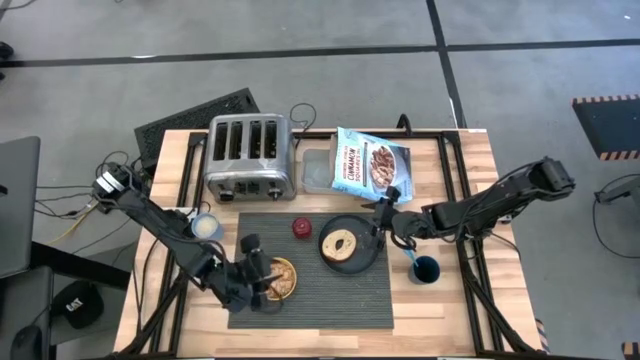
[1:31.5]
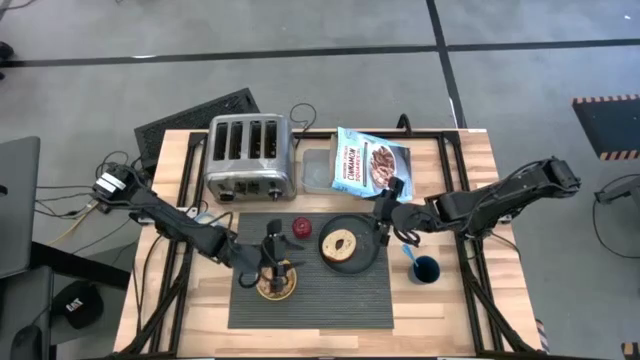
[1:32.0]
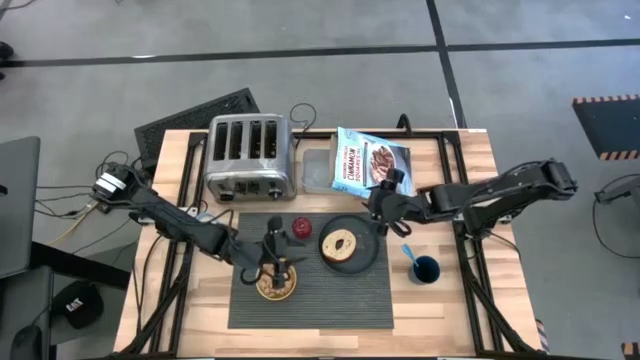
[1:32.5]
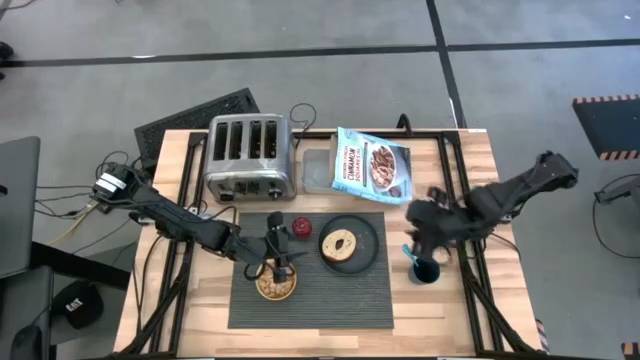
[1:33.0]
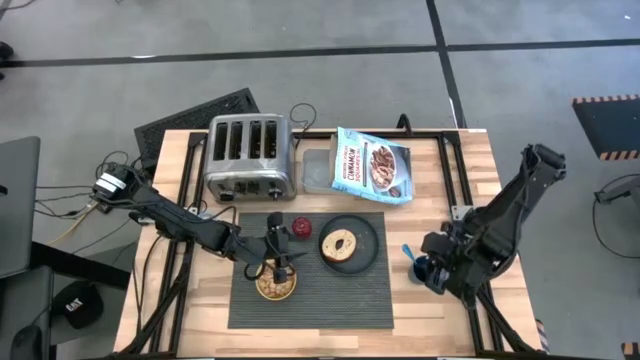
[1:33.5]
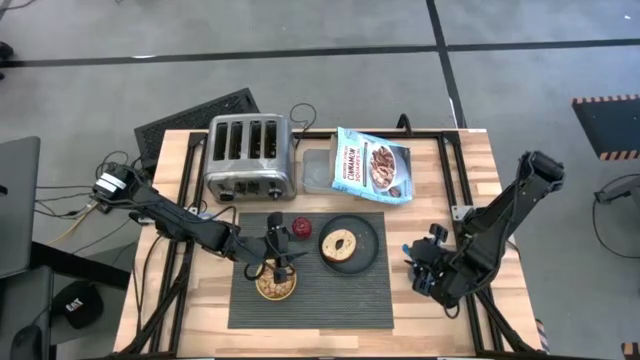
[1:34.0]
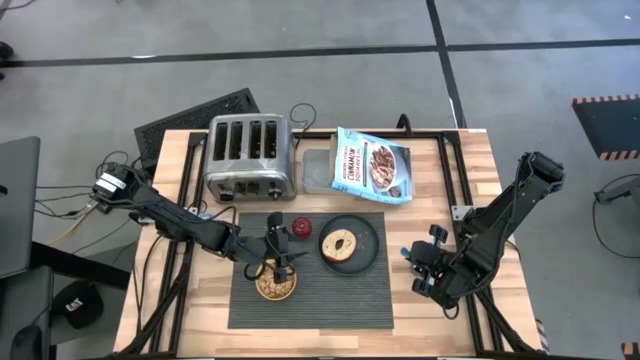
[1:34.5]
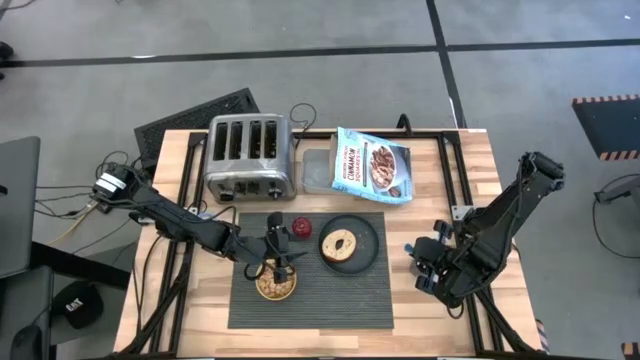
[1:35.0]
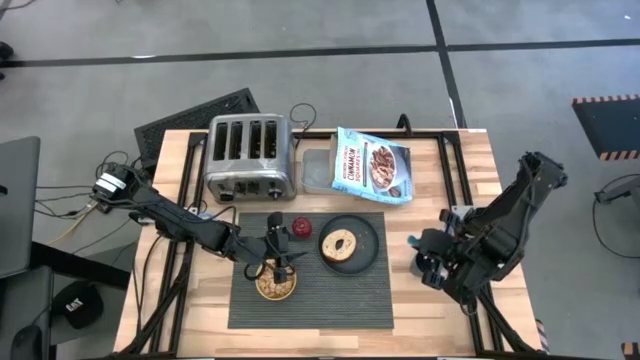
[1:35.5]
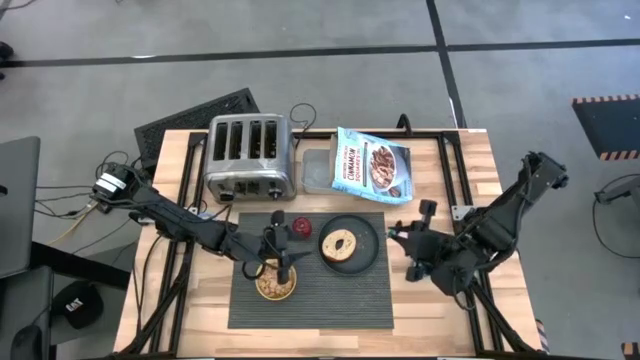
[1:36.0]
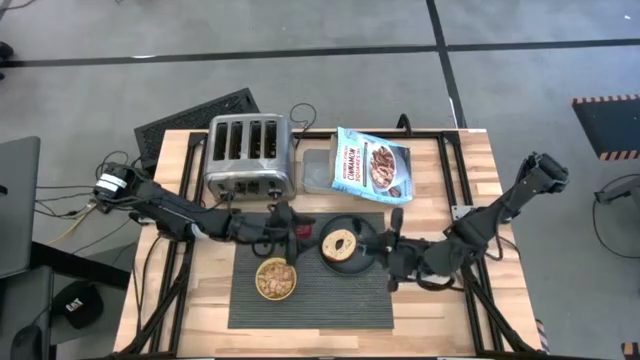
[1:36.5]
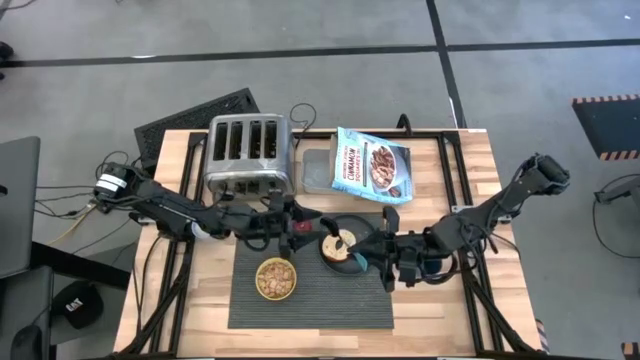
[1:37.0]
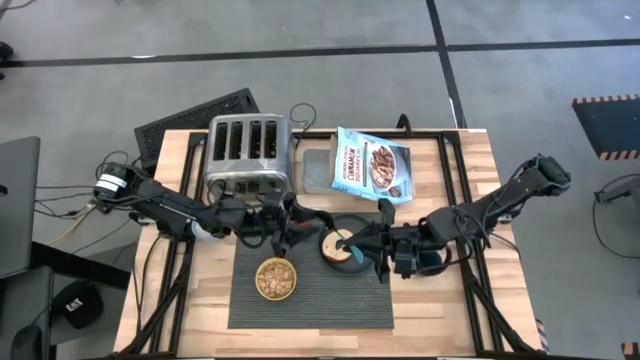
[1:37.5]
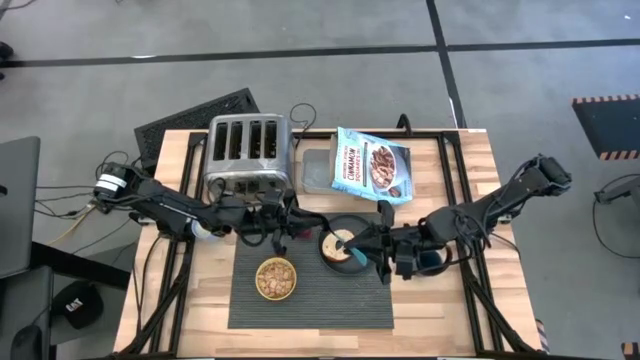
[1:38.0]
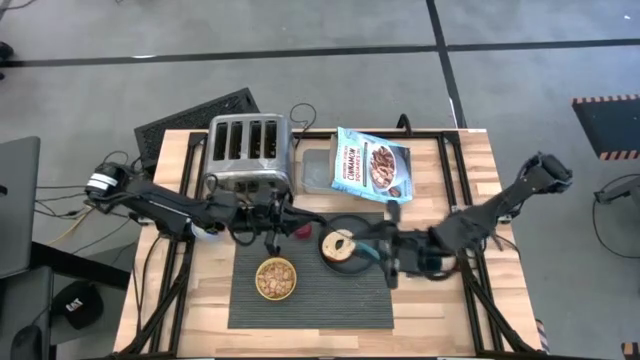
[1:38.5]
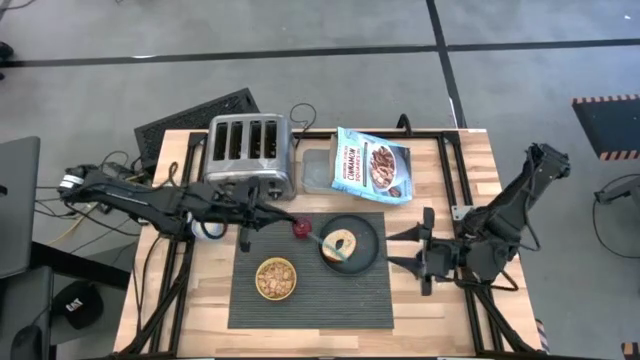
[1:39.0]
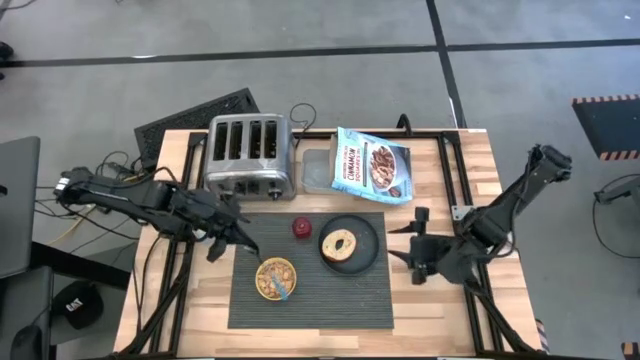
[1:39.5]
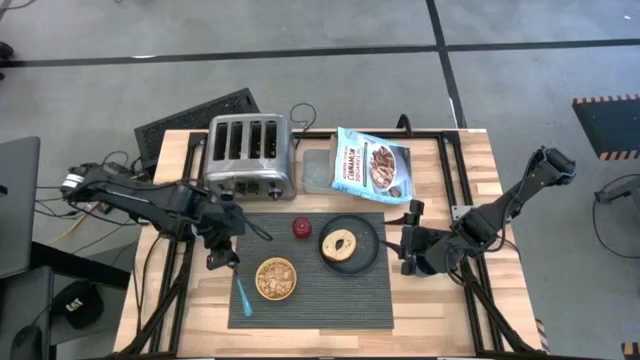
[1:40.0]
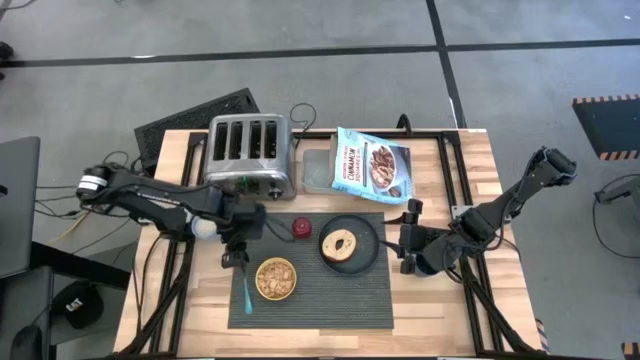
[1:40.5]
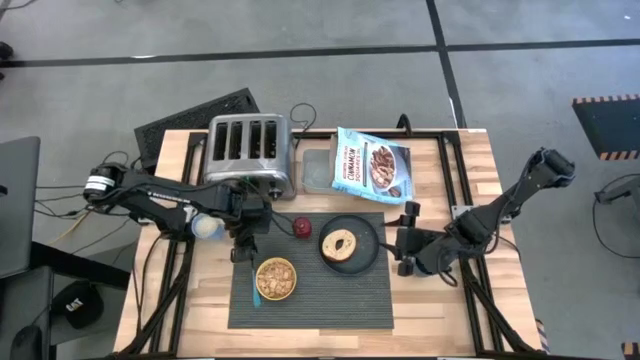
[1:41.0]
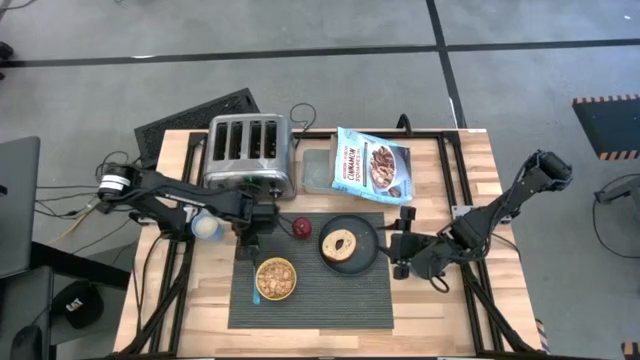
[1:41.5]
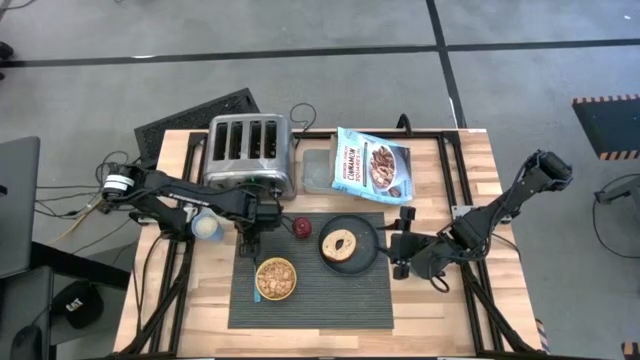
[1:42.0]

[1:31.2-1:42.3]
Task: Arrange a breakfast setting
Put the blue spoon on the tablemat to the left of the yellow patterned bowl

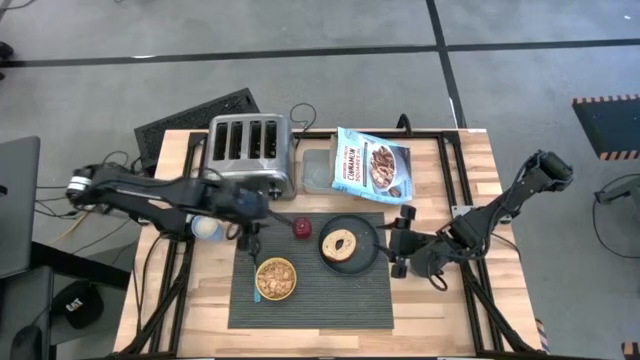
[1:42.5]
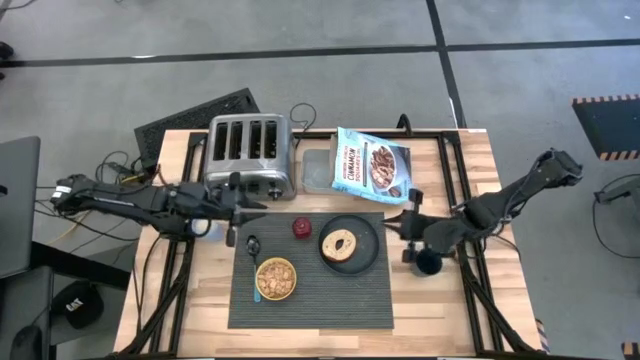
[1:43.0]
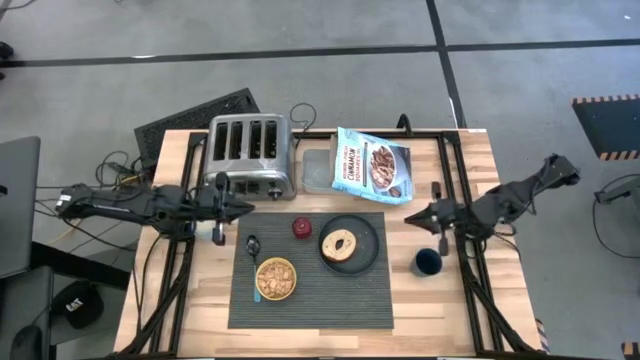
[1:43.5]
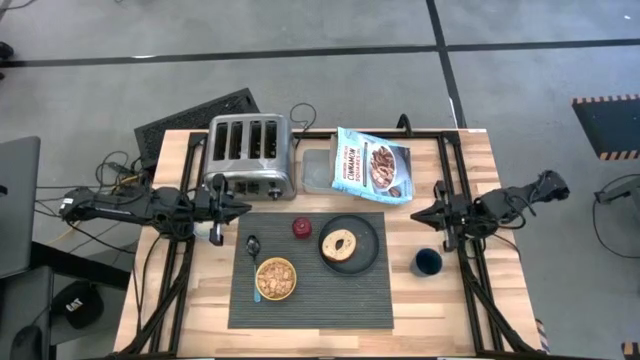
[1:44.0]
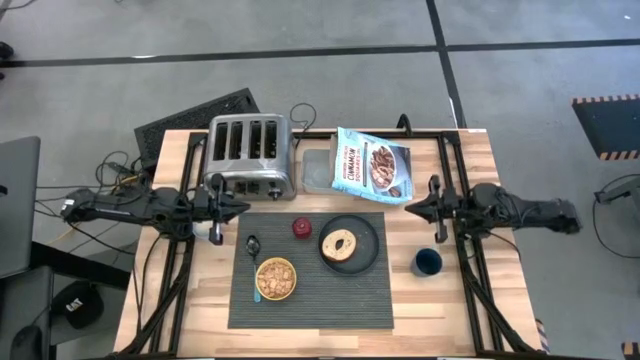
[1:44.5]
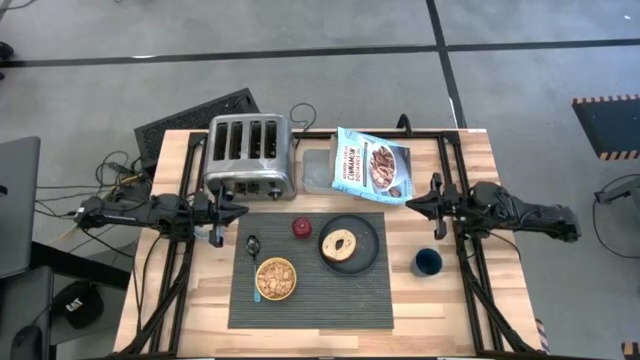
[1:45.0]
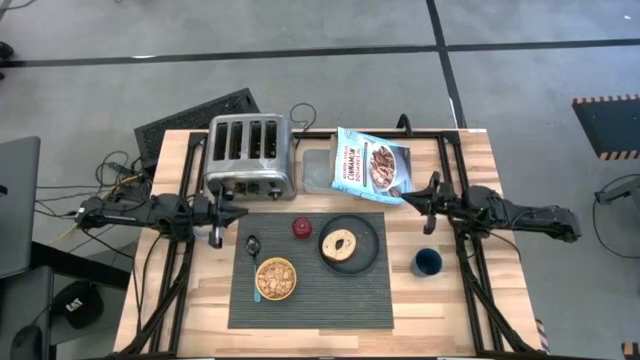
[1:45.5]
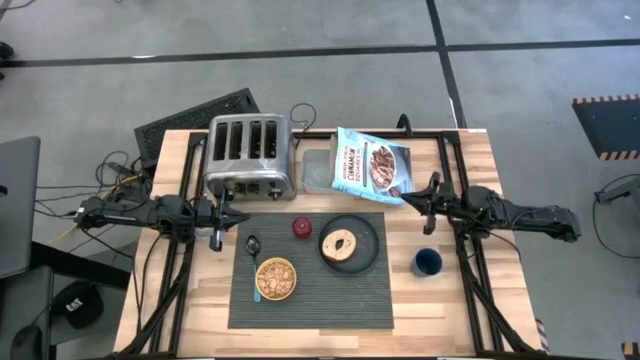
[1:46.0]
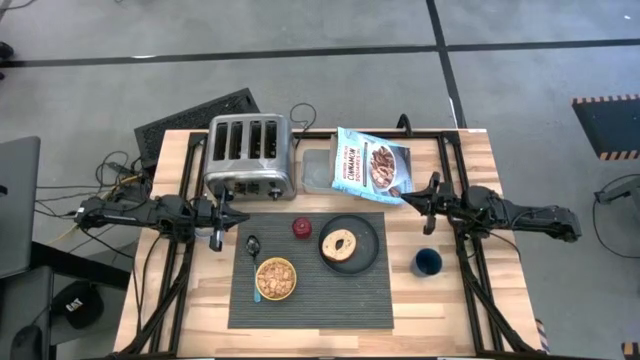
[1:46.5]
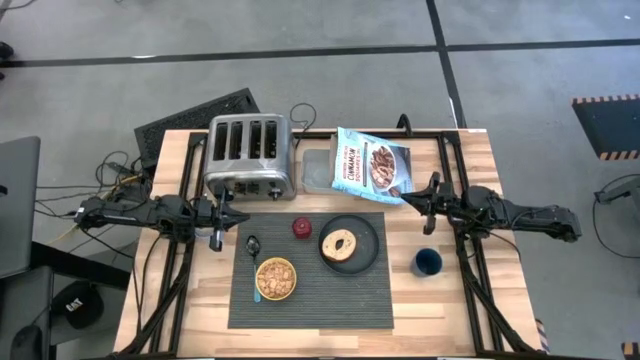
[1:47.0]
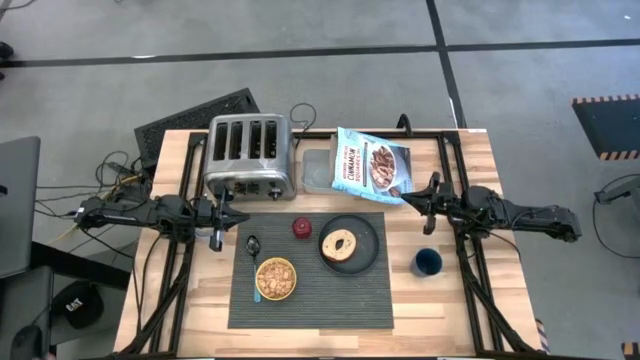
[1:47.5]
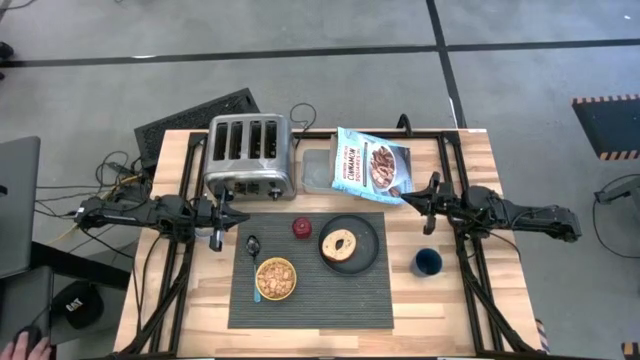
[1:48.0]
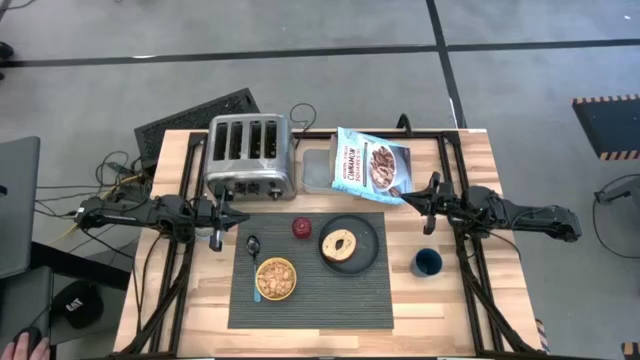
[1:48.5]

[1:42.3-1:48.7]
Return to Home Position

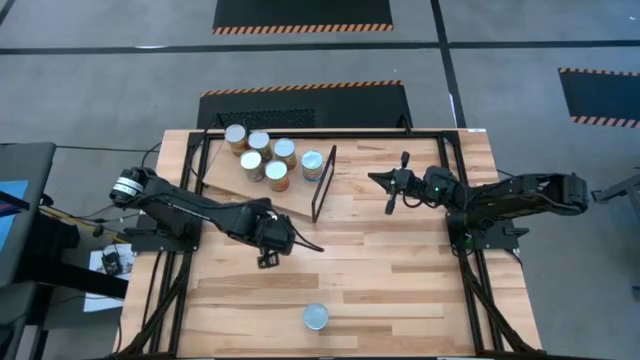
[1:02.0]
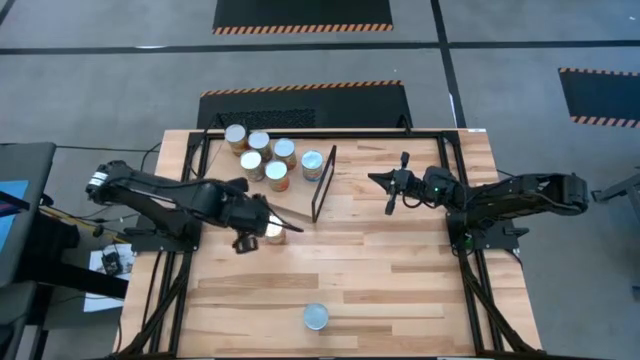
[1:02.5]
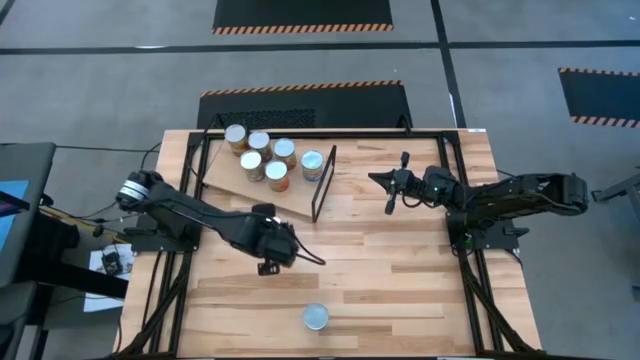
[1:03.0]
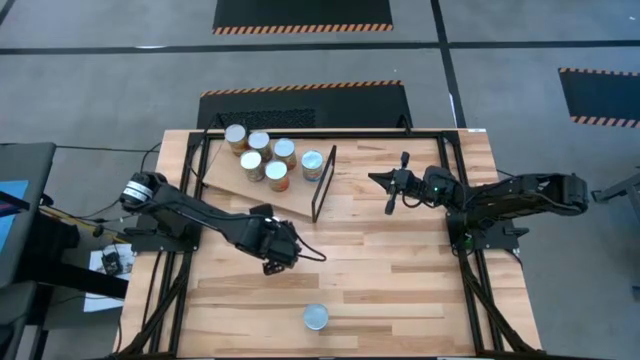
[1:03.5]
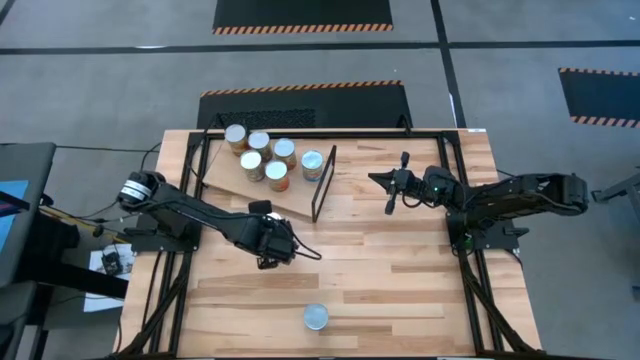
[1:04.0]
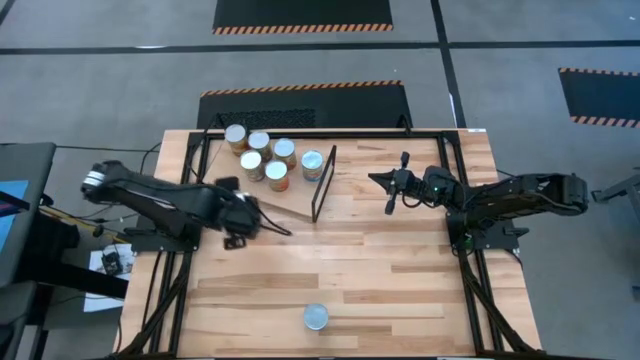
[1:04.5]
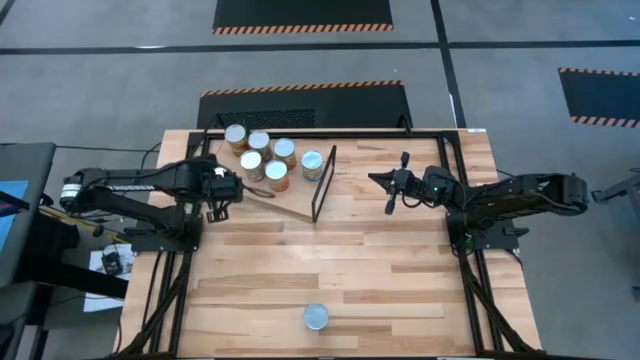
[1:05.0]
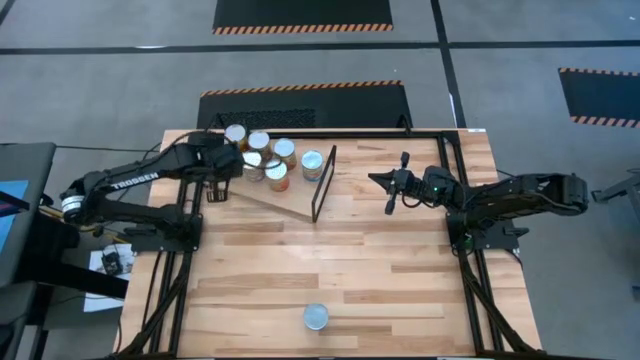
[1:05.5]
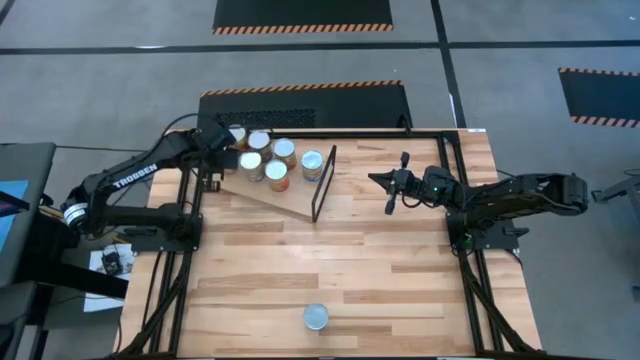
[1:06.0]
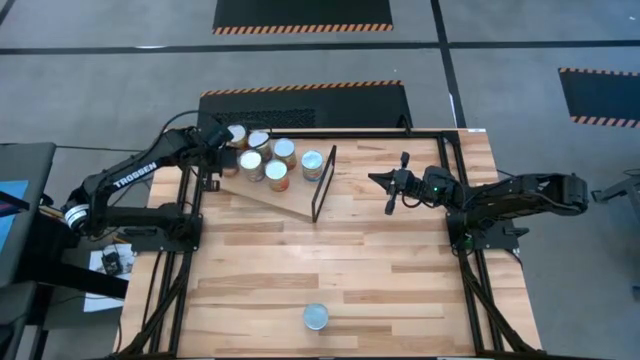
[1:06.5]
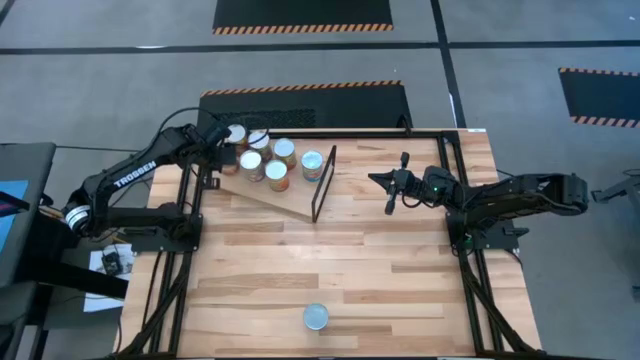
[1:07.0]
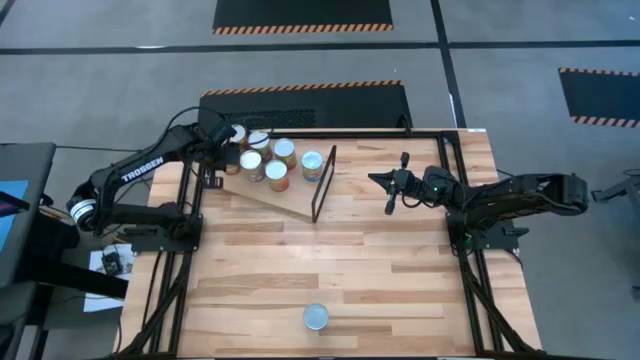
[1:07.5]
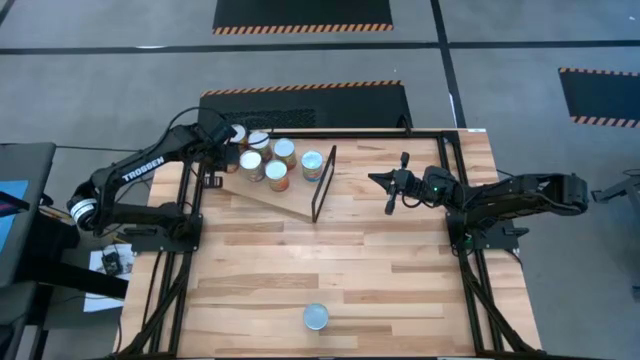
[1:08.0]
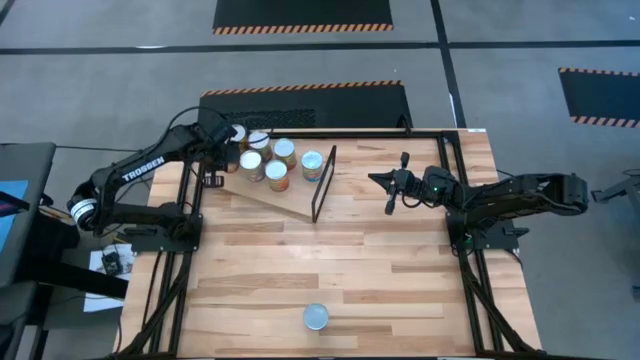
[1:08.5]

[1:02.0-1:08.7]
Task: Pick and place cans onto a shelf
Align the canned corn with the other canned corn on the shelf
